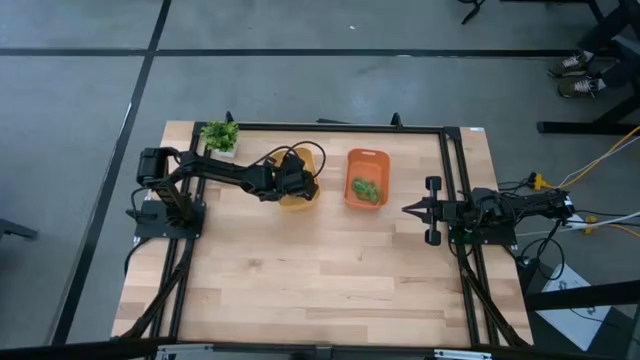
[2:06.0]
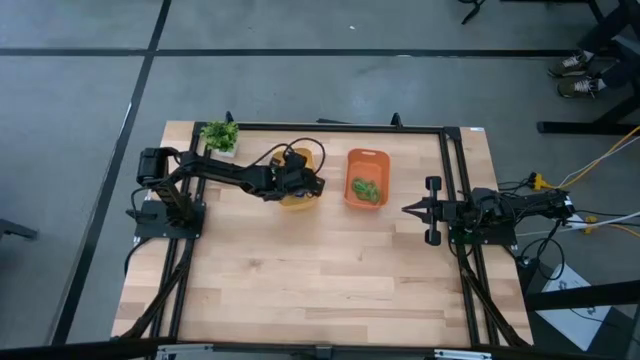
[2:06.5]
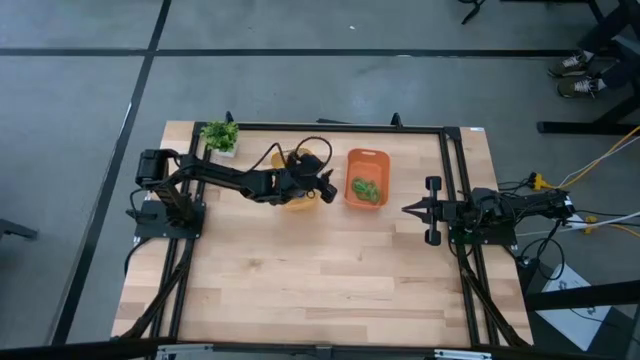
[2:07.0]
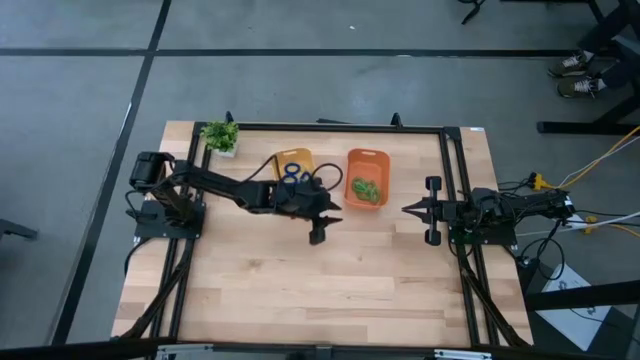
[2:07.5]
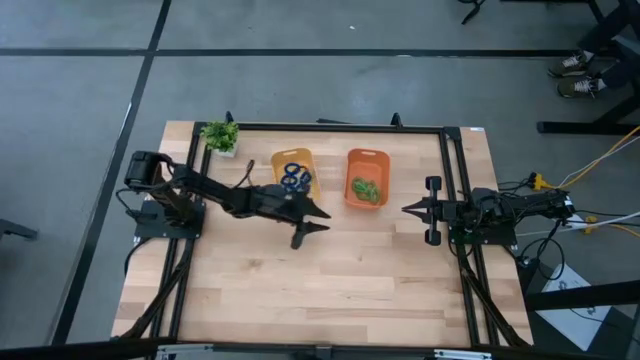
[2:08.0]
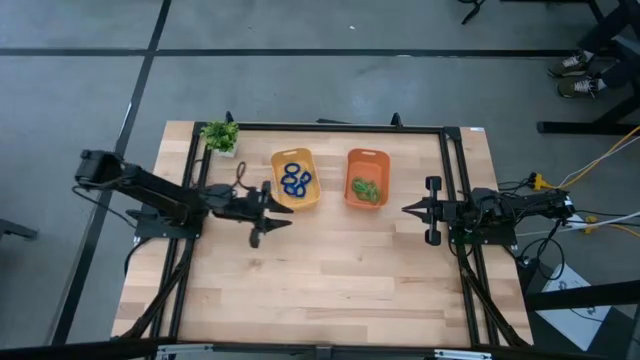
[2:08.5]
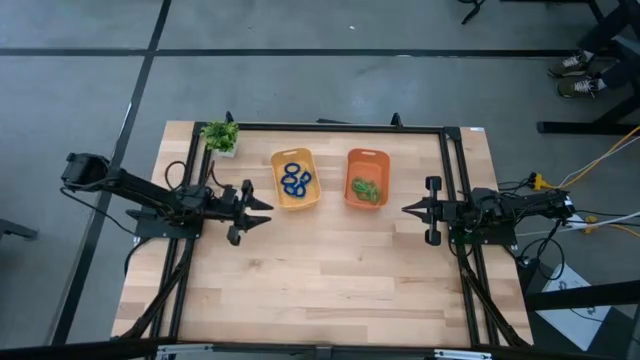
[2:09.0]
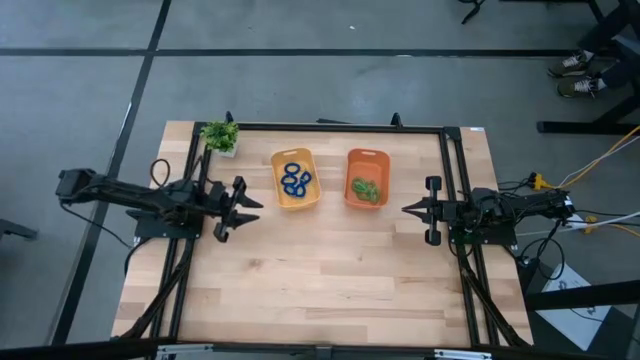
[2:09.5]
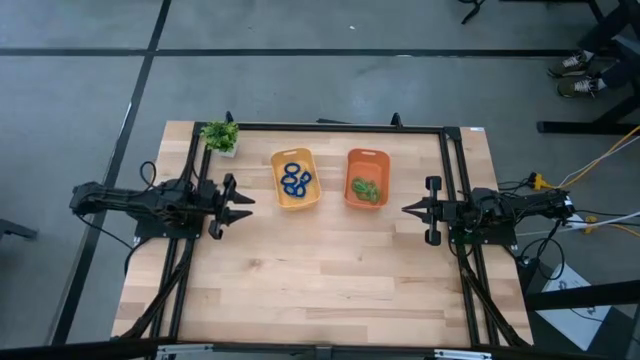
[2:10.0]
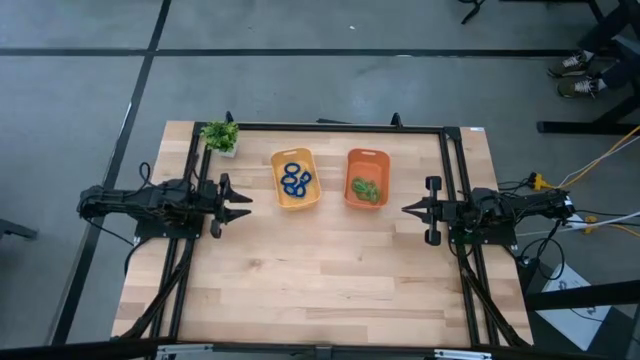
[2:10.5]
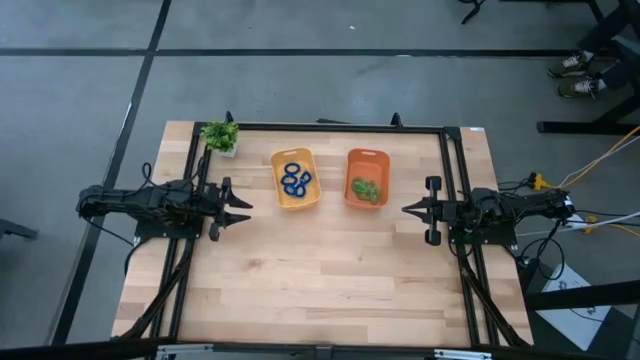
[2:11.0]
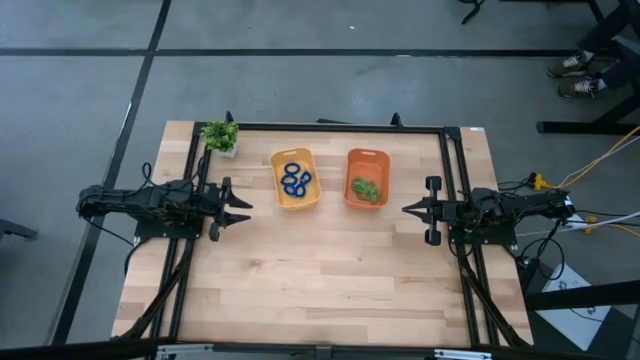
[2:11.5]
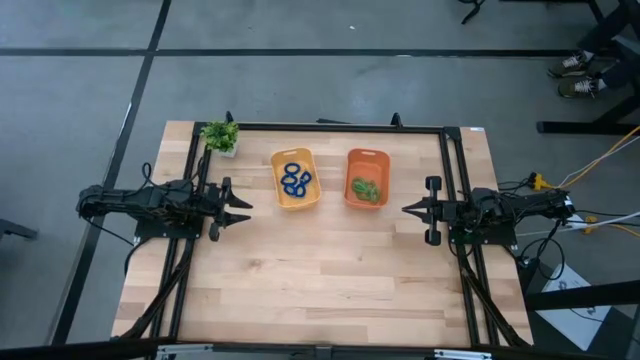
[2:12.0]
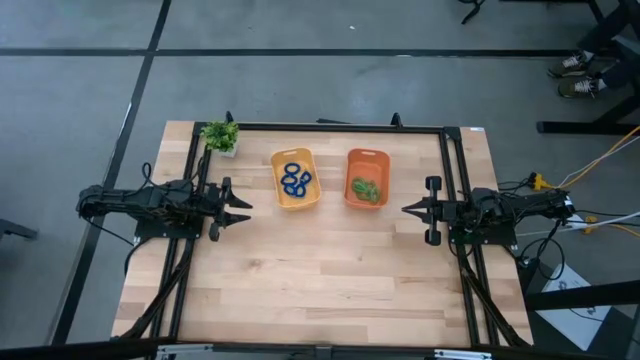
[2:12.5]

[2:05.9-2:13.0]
Task: Sort spring keychains
Return to Home Position

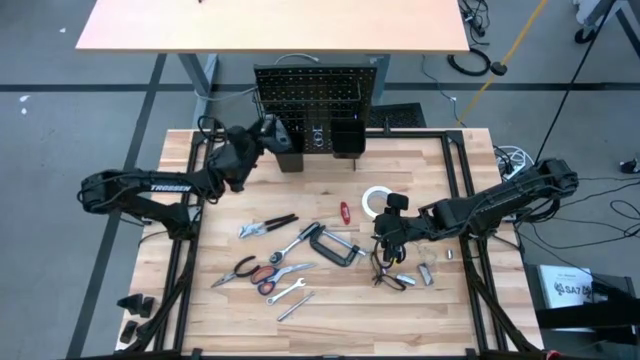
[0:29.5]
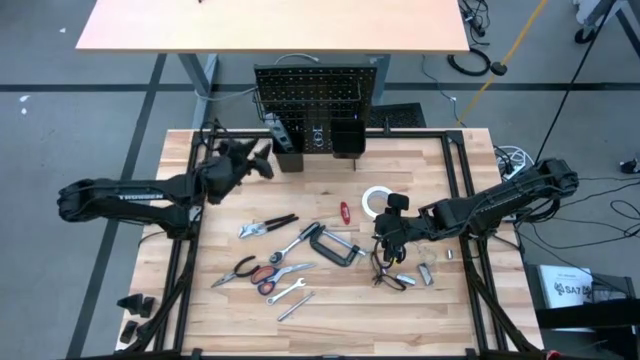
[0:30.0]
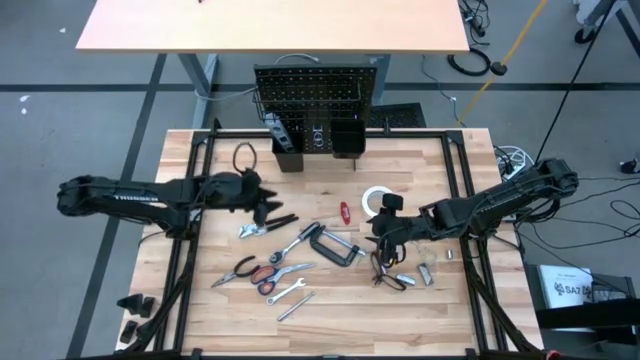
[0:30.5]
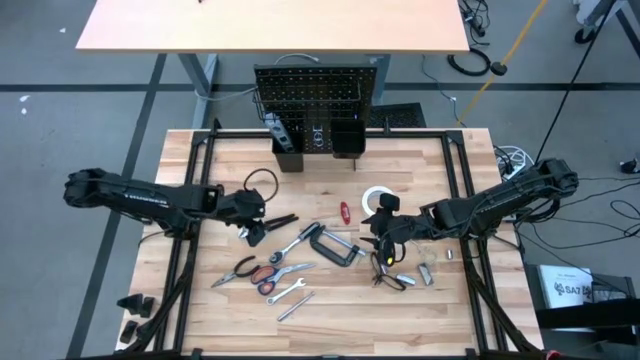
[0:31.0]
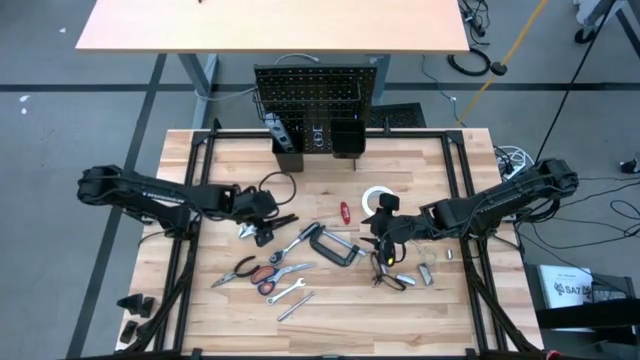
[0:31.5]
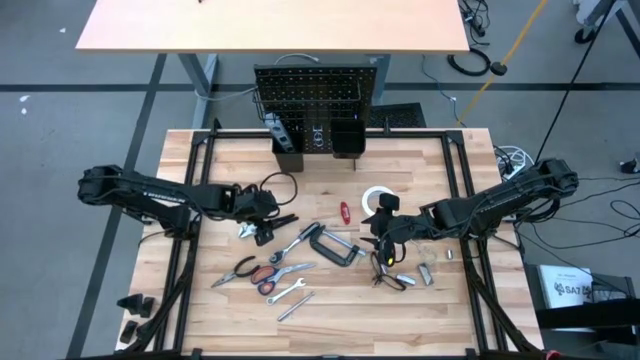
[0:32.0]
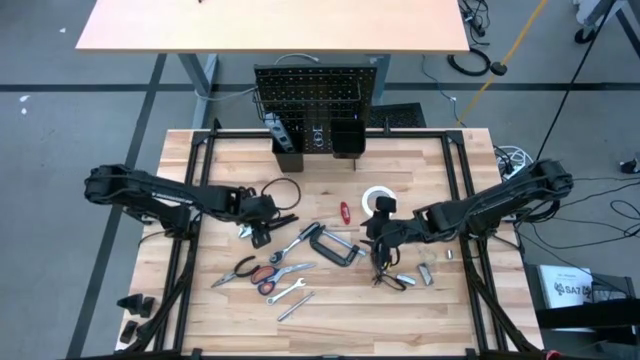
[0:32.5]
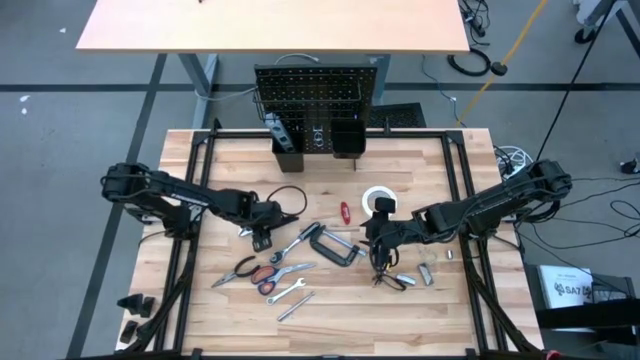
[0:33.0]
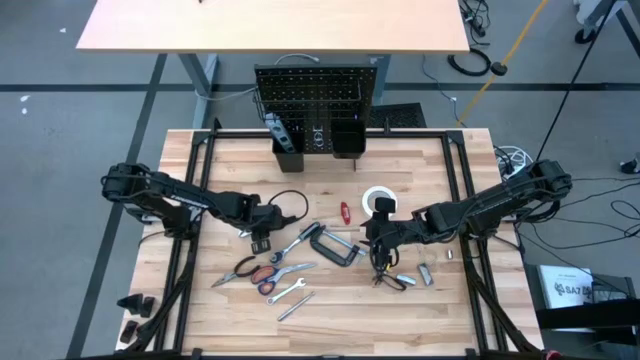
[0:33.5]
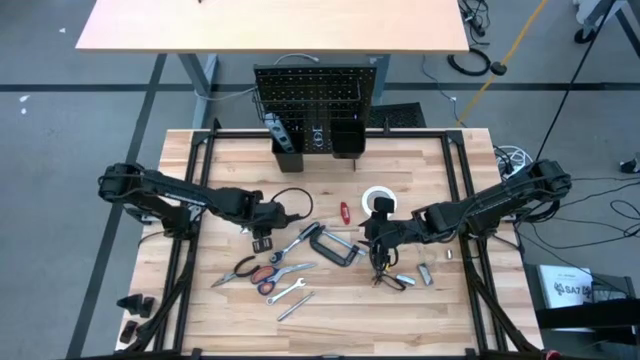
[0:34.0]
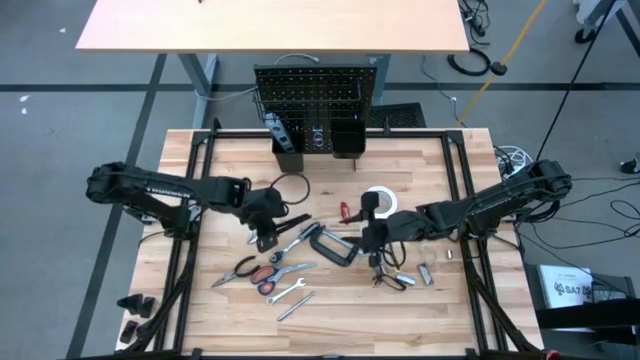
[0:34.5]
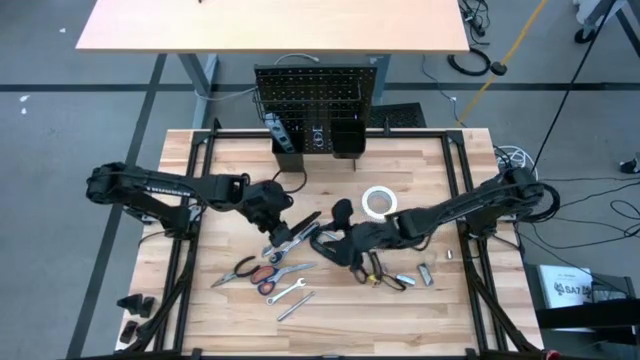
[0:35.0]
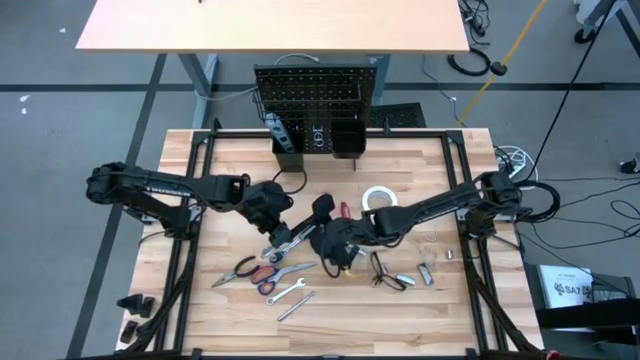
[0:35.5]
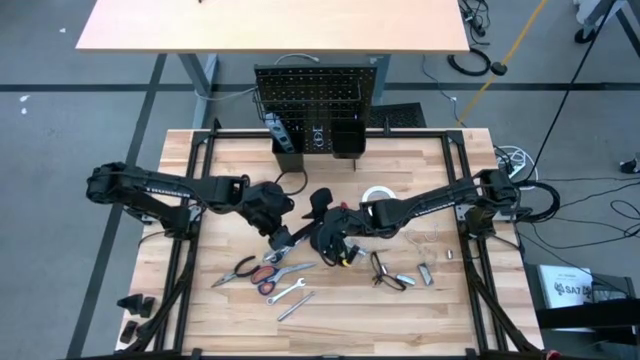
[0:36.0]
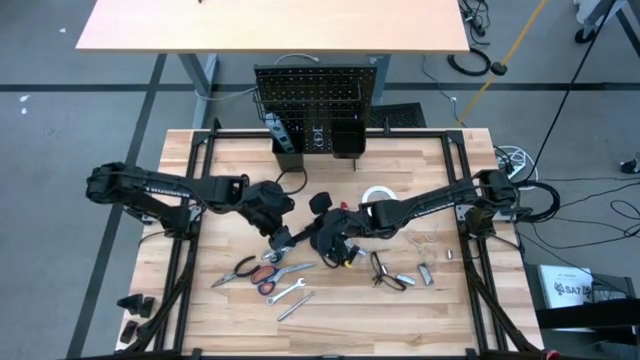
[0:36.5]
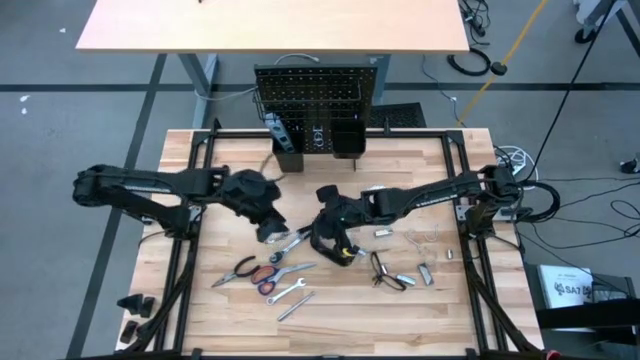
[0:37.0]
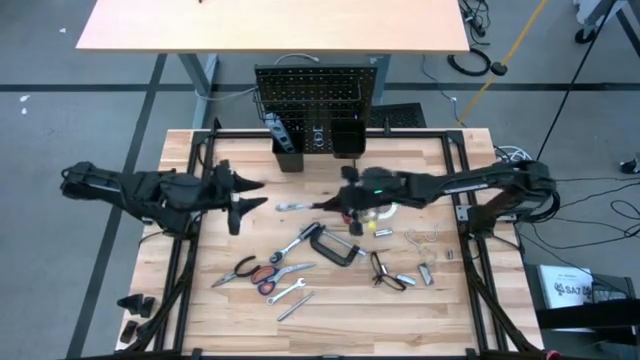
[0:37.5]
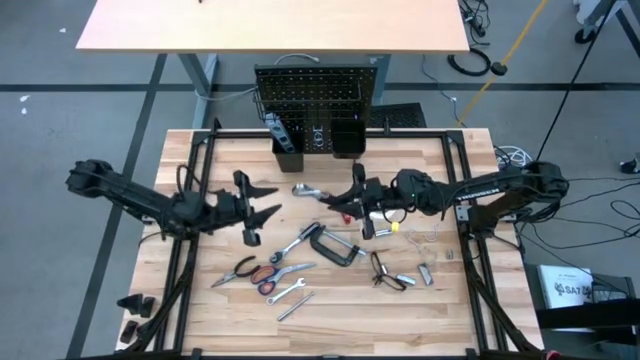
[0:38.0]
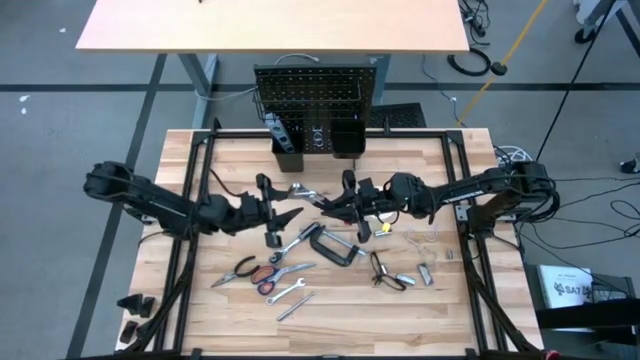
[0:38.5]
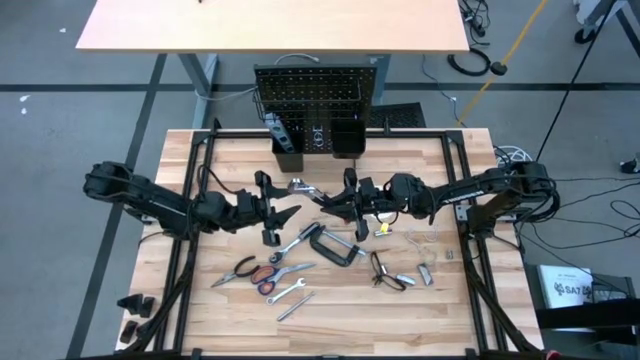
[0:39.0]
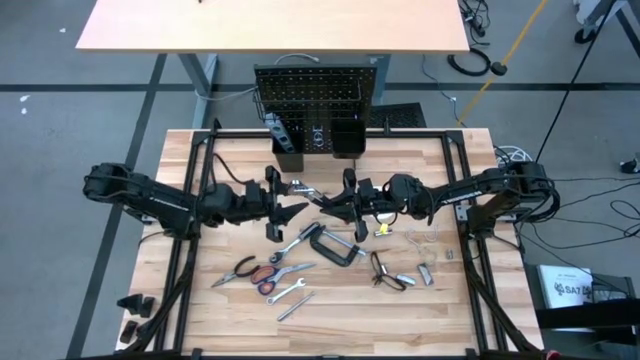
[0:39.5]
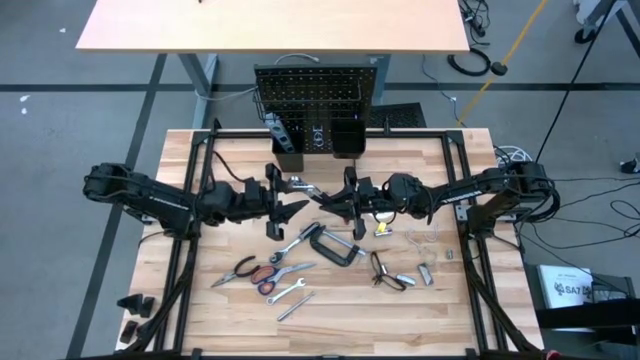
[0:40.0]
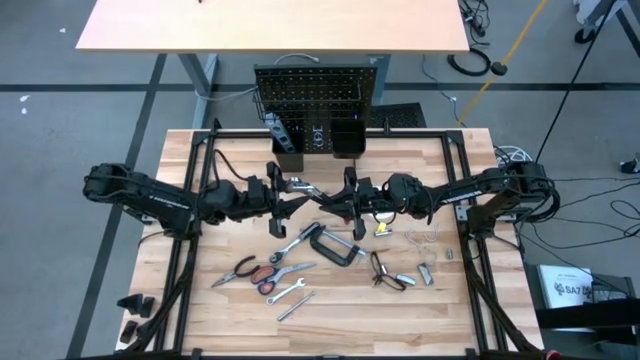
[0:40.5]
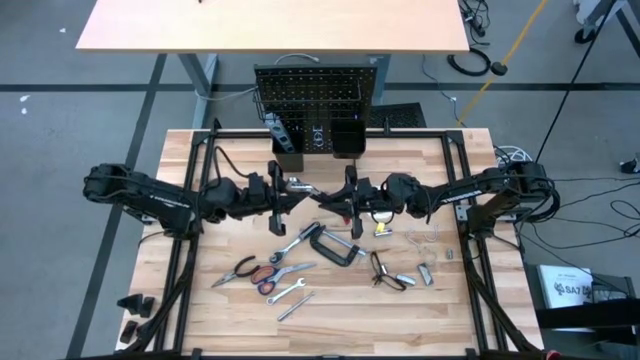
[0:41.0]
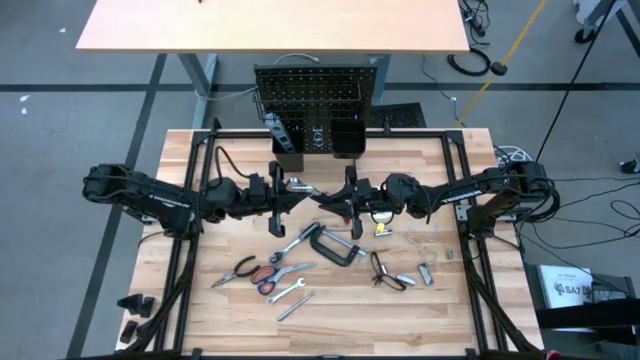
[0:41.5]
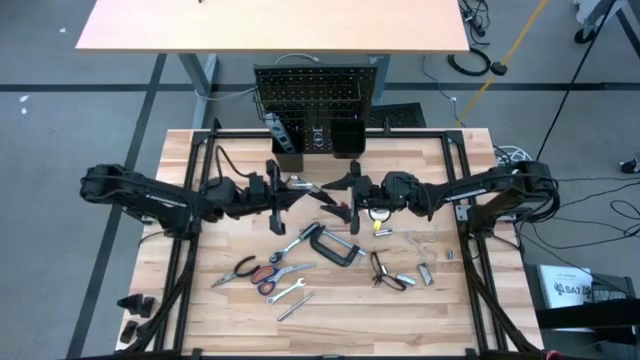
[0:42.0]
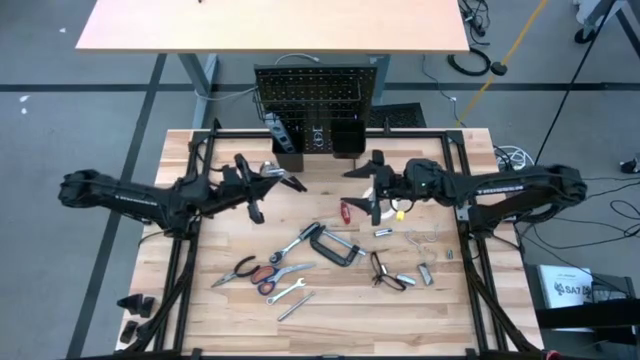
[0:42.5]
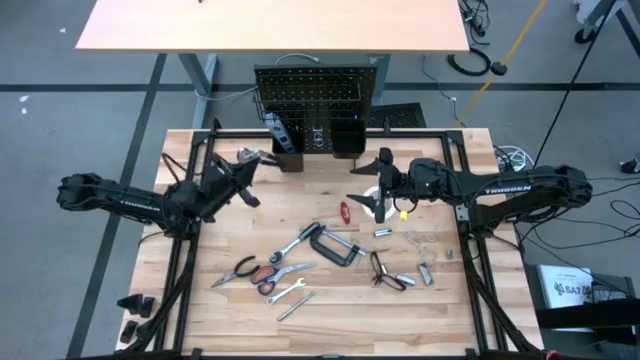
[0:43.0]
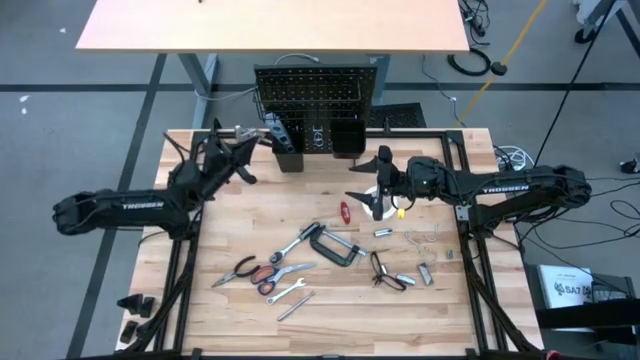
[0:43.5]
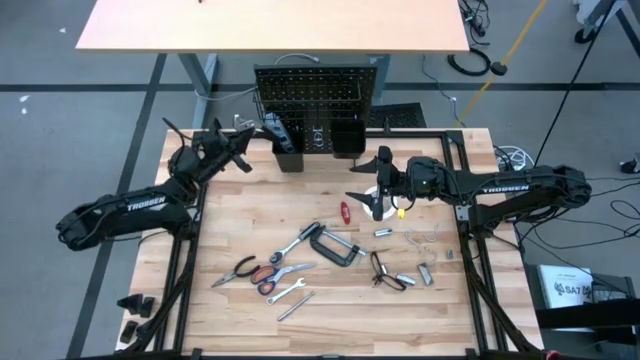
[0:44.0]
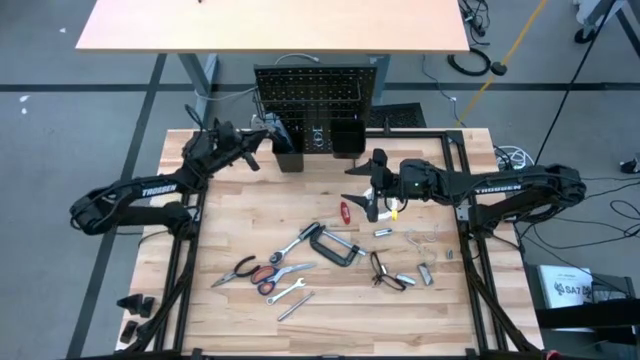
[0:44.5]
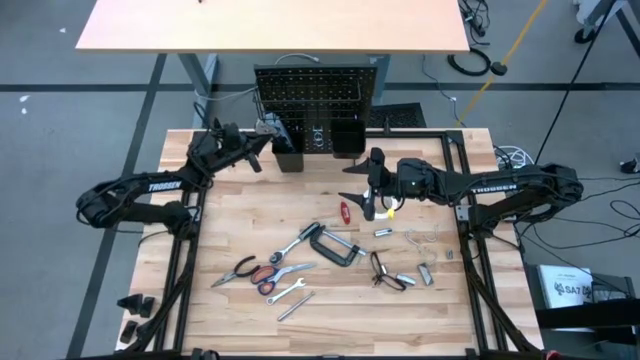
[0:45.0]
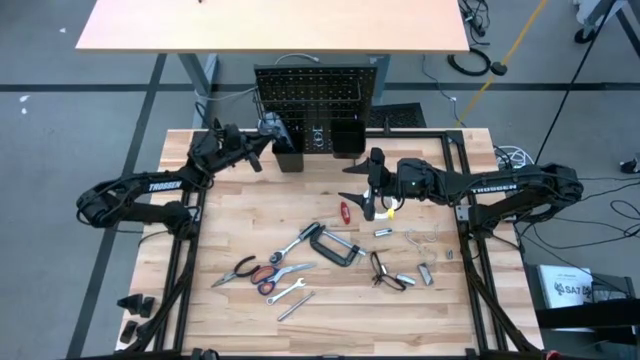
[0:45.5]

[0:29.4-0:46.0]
Task: Hang tools onto peg board
Put the clamp wrench on the left lower deck of the pegboard
